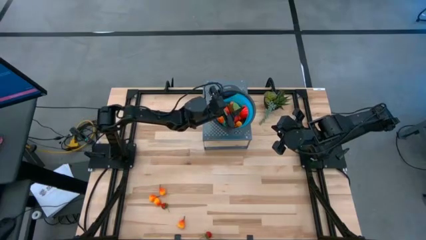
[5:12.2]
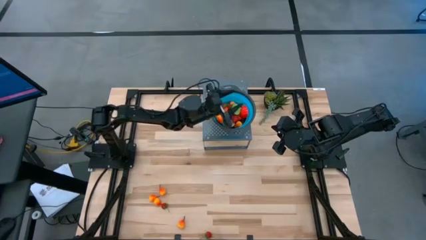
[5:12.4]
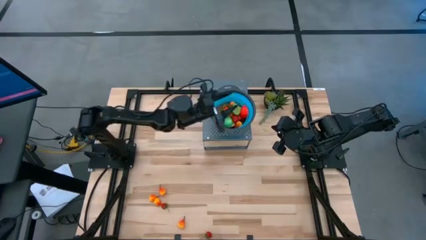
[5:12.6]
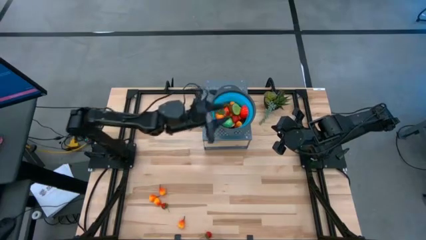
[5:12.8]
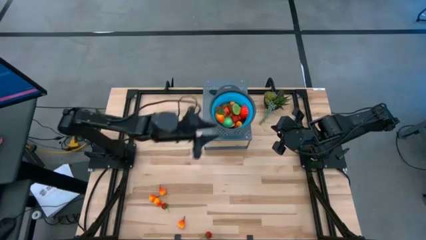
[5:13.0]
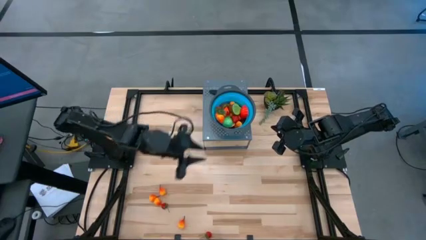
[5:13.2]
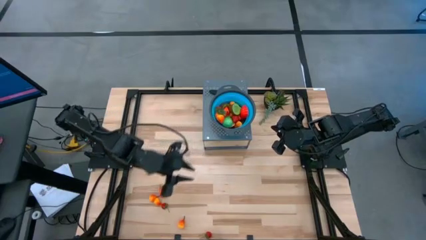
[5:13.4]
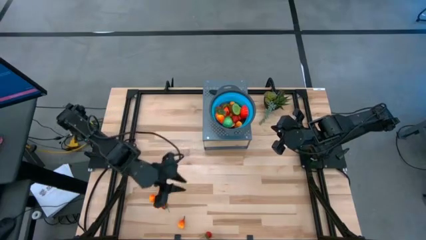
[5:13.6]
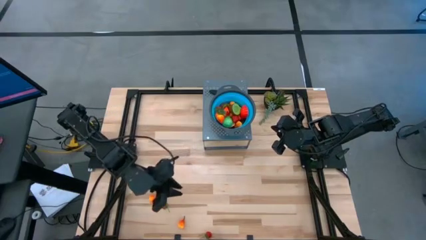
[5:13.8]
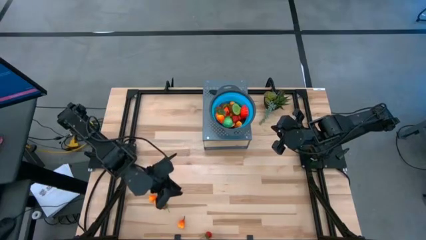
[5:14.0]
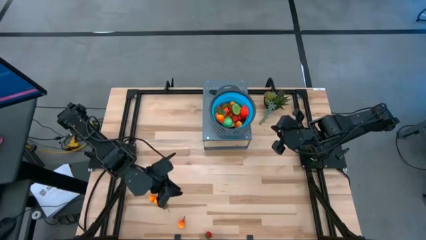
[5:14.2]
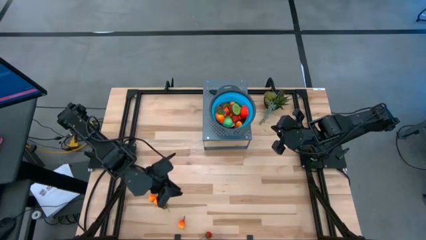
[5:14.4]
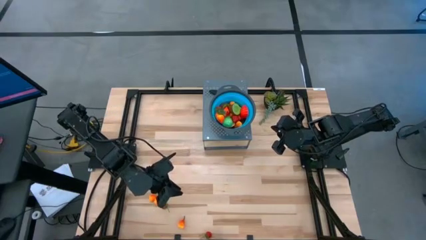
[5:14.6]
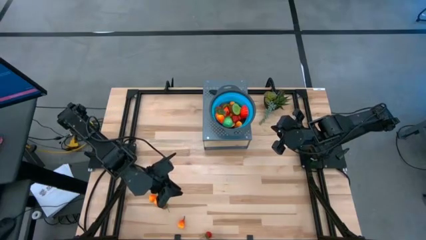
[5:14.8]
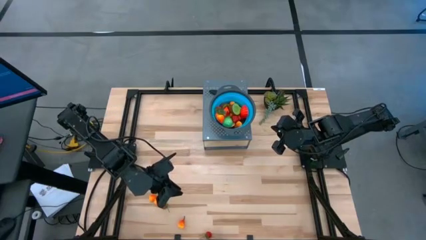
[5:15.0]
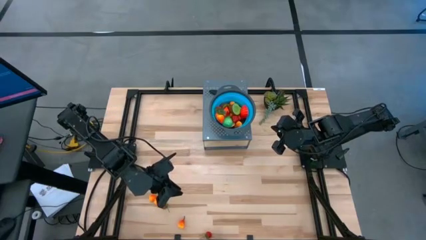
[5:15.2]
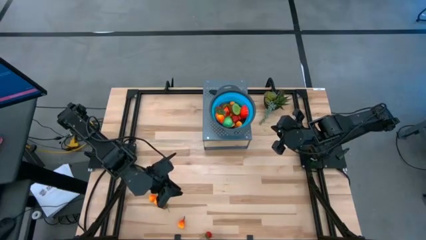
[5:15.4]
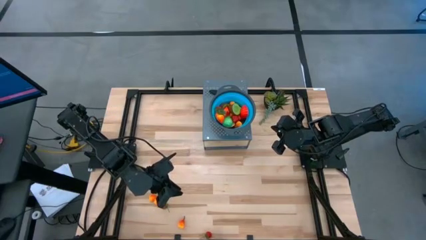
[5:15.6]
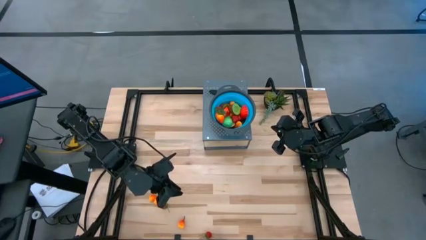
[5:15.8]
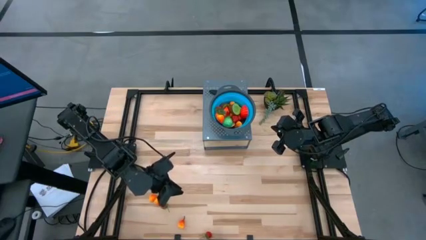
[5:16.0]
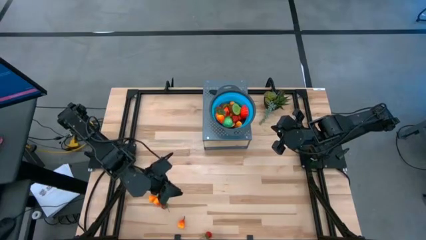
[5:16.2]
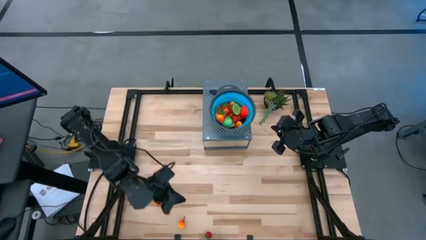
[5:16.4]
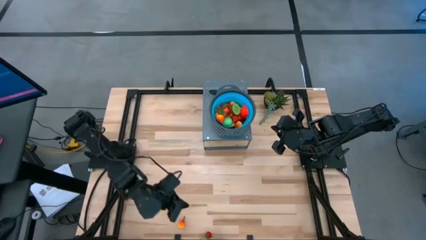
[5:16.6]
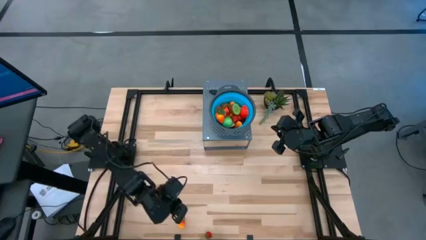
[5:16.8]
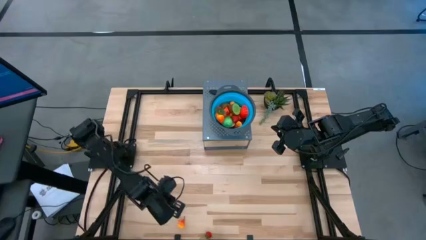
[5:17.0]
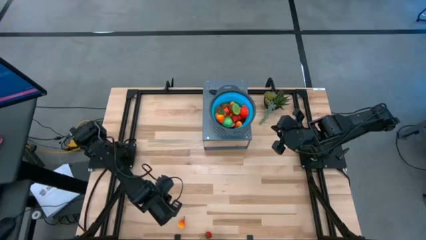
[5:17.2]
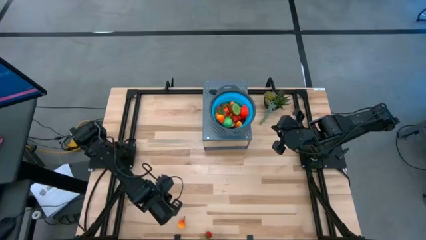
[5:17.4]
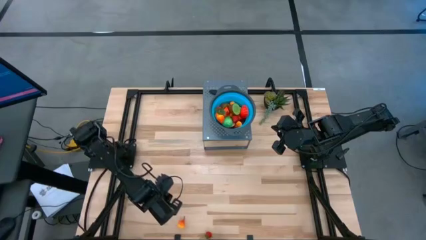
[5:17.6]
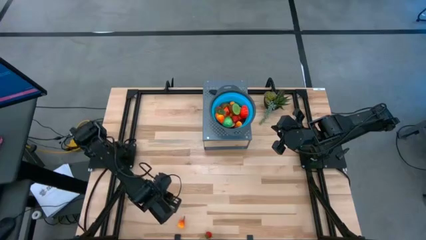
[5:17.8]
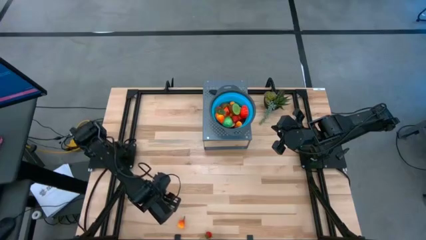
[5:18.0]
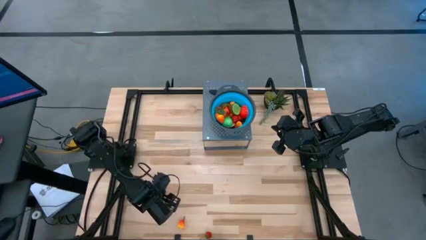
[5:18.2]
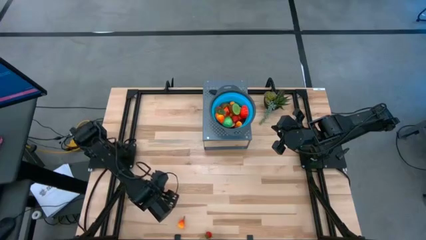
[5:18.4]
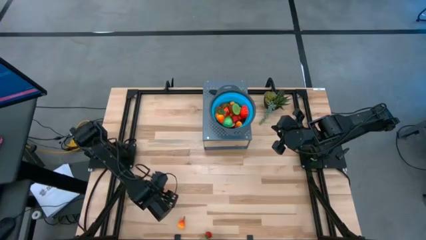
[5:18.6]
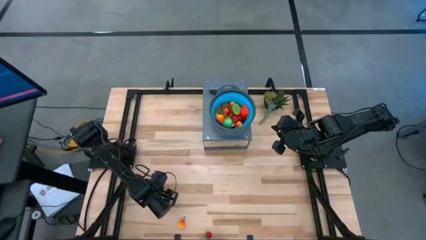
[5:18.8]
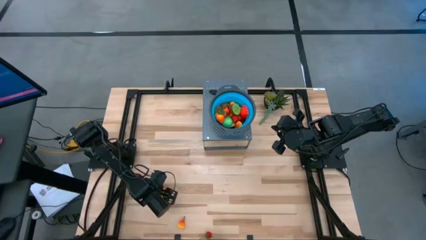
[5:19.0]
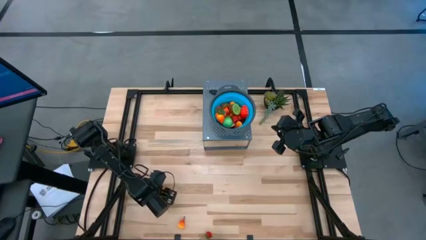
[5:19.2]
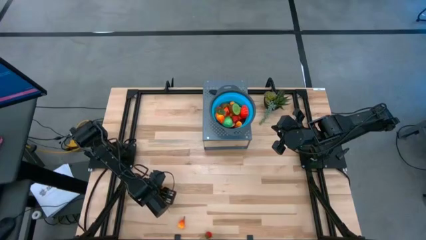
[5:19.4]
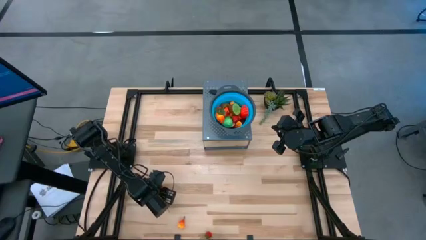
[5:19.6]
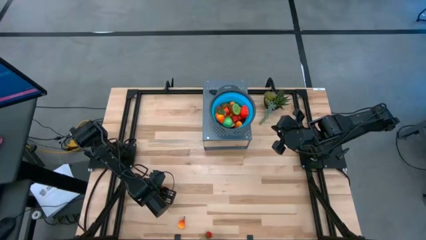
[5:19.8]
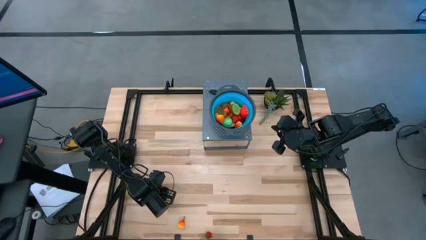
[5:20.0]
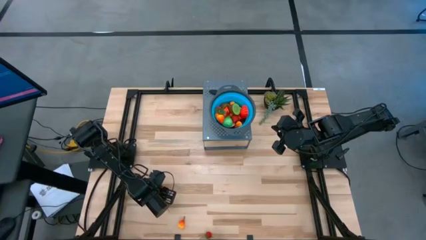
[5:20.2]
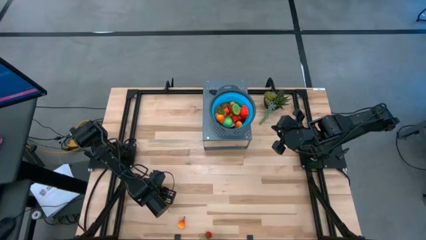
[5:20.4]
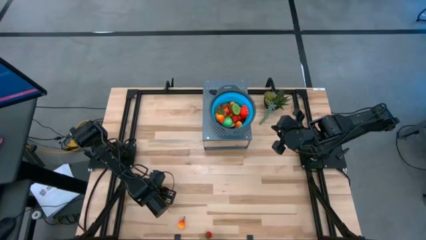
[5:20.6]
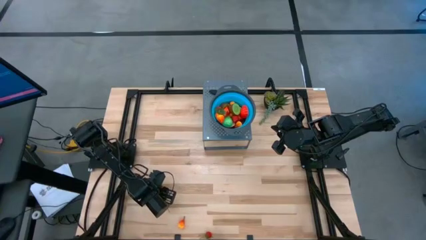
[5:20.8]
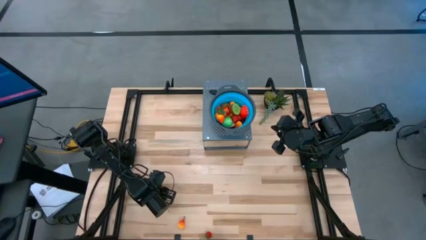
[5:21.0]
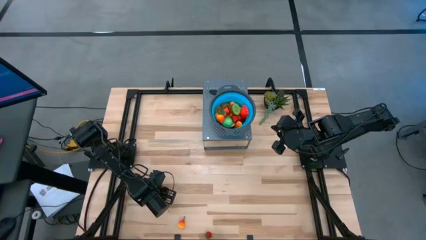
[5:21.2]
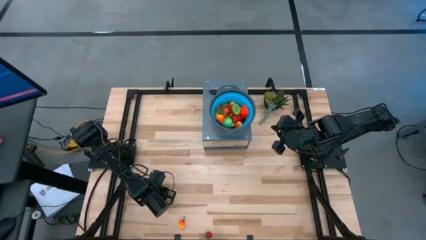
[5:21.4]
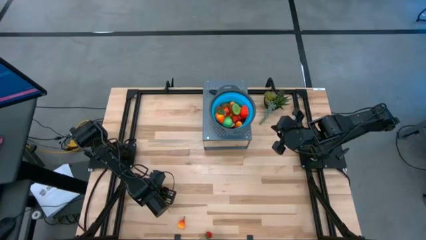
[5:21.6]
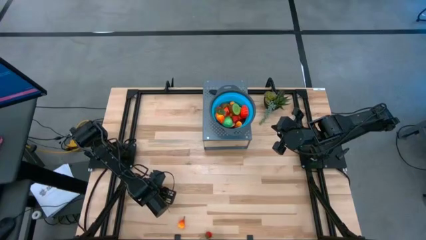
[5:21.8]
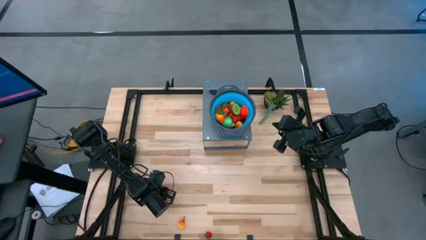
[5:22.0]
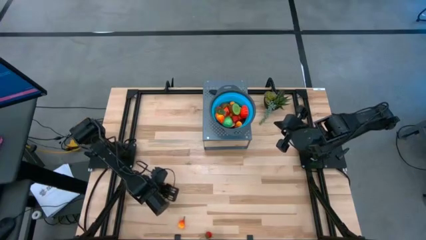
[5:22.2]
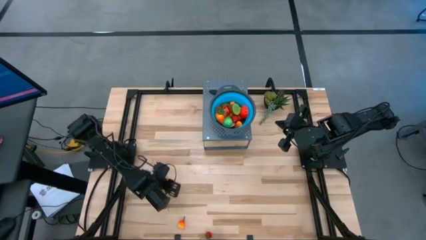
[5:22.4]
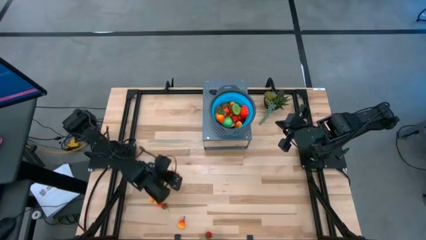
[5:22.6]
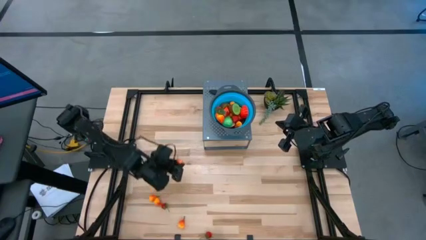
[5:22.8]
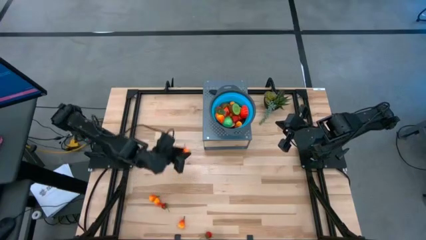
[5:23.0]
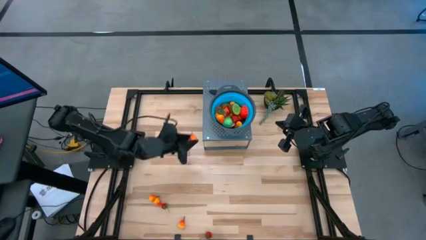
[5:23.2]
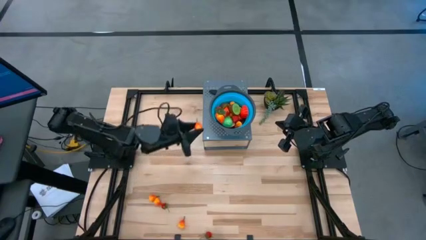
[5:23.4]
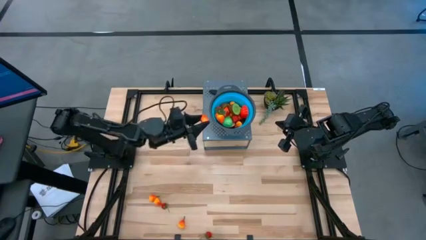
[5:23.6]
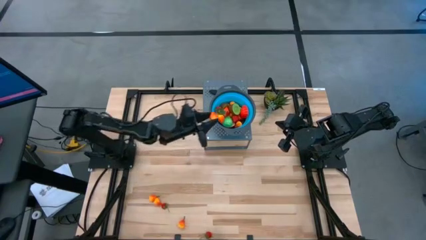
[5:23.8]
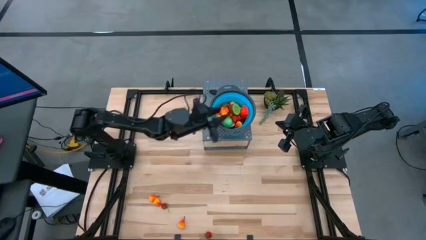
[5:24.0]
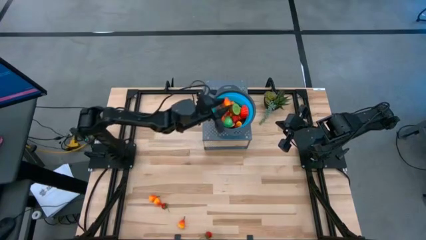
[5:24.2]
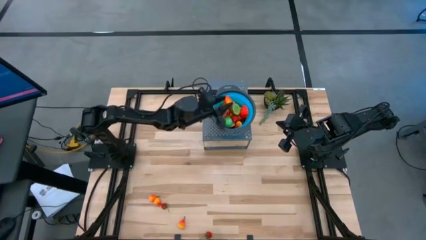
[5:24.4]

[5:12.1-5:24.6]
Task: Pick & Place Fruit
Put the peach into the strainer bowl
